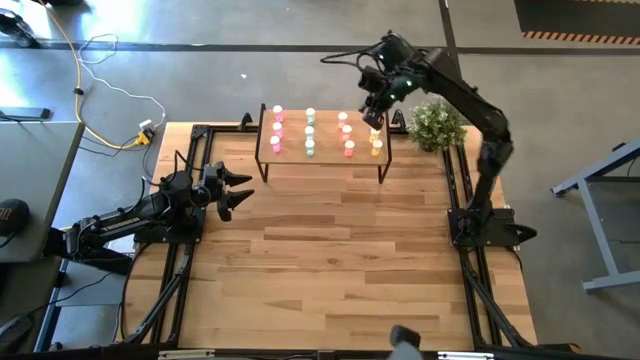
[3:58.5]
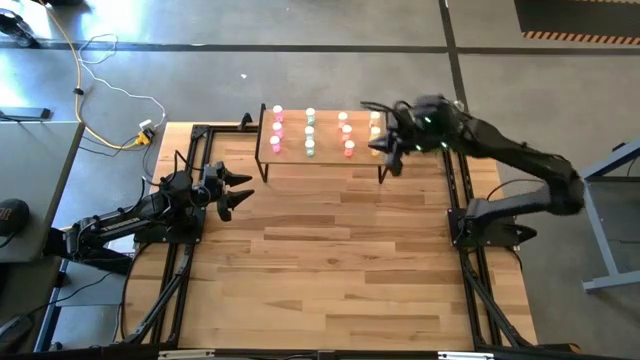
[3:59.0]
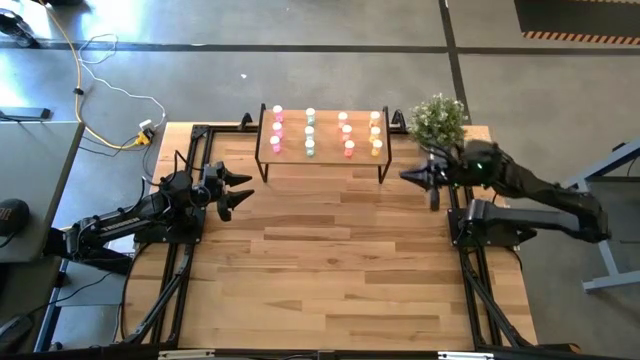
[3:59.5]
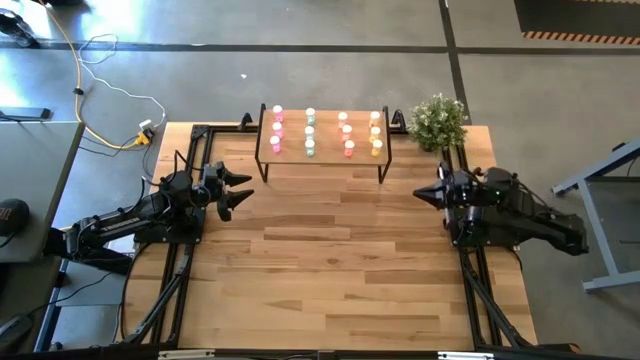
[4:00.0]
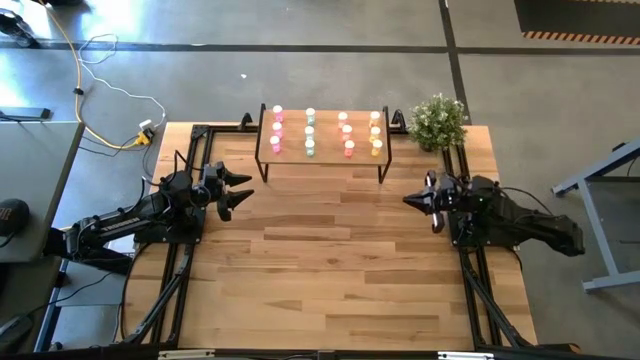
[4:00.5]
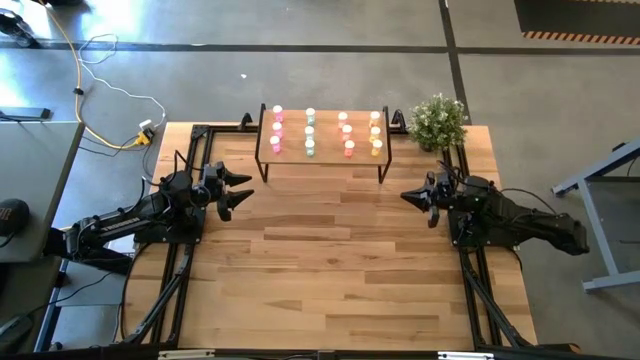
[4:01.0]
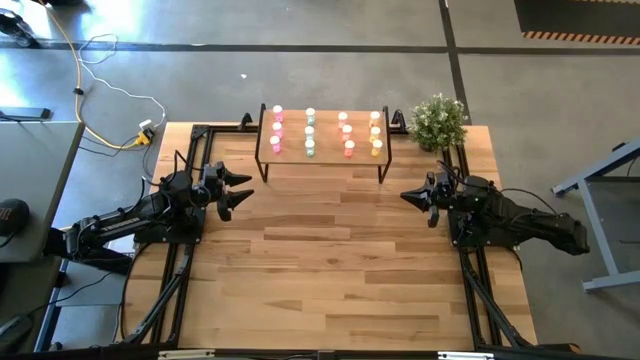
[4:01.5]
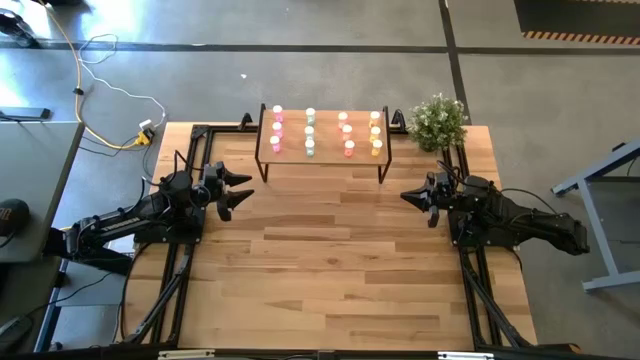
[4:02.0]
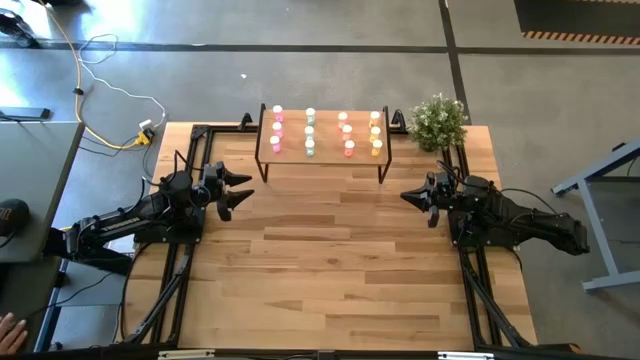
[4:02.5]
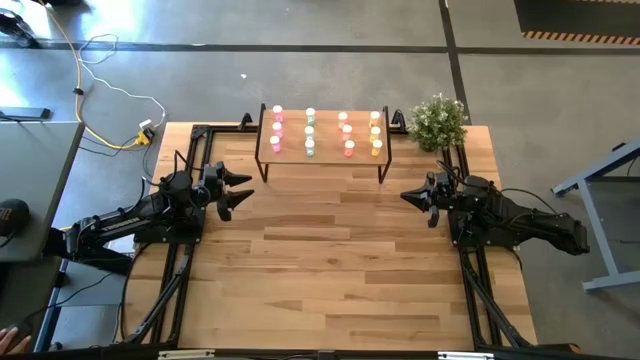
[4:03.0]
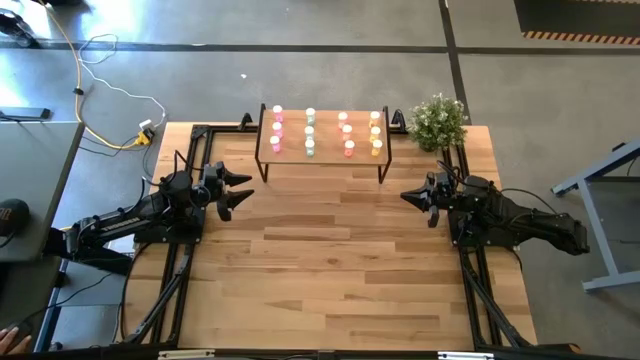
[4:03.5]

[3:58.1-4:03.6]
Task: Pick and place medicine bottles onto shelf by color
Return to Home Position

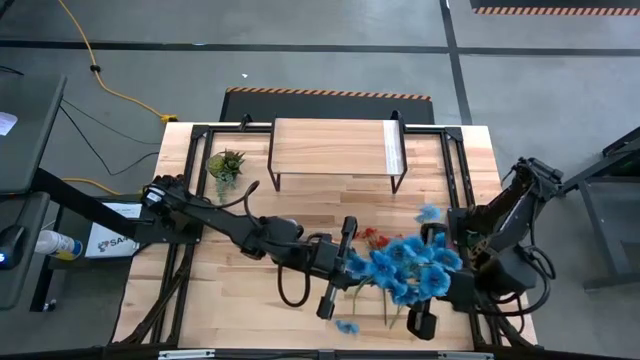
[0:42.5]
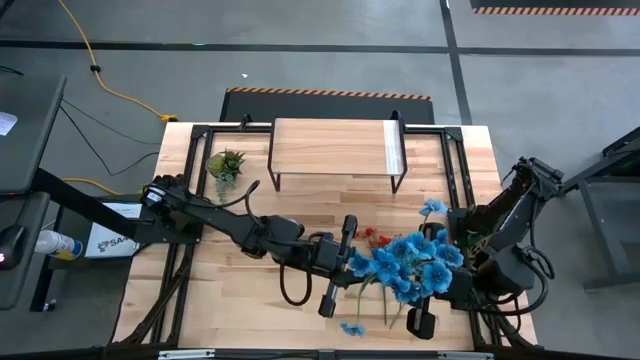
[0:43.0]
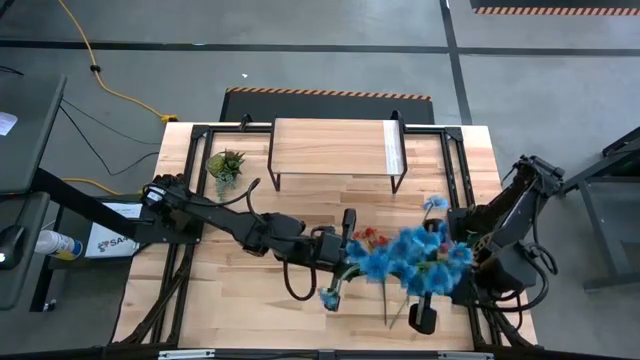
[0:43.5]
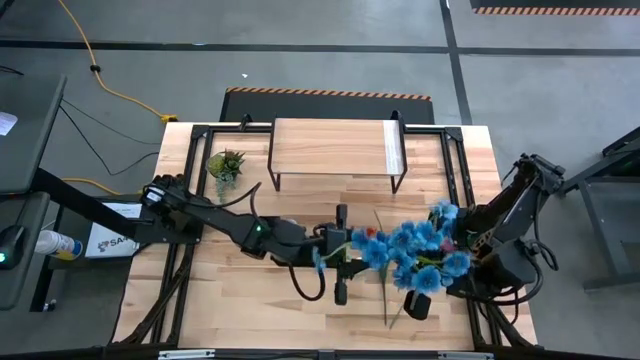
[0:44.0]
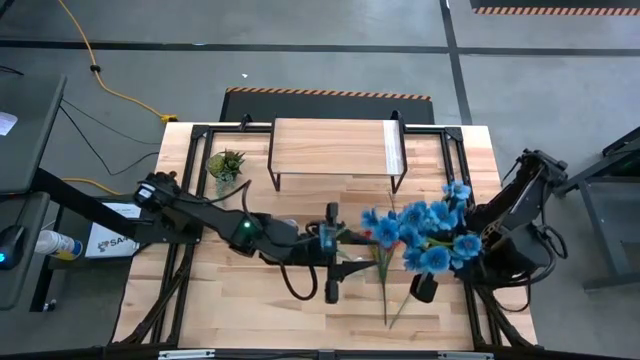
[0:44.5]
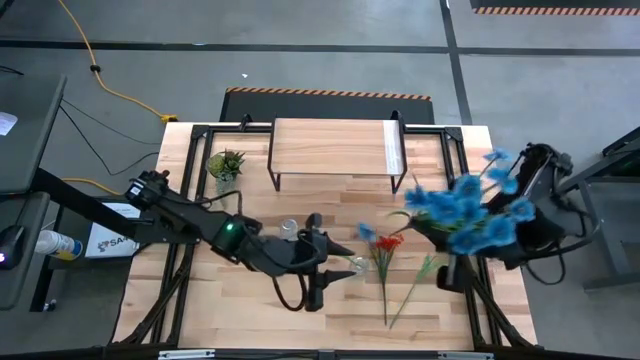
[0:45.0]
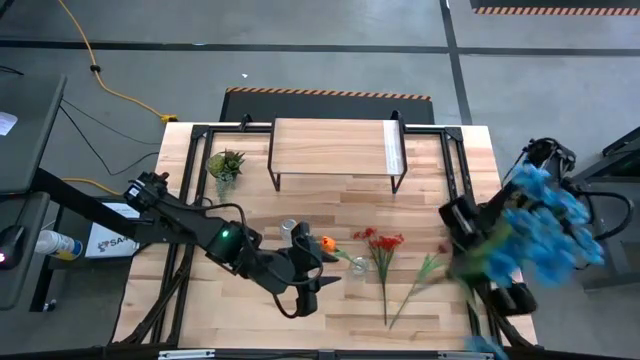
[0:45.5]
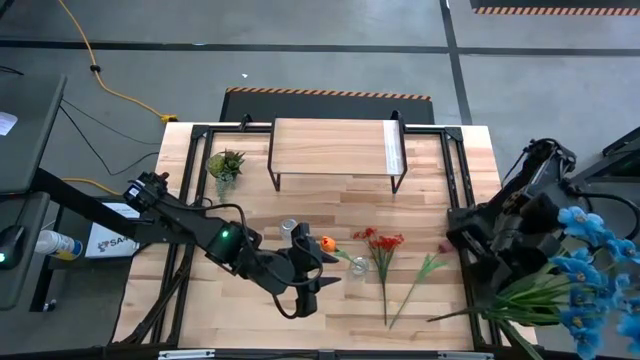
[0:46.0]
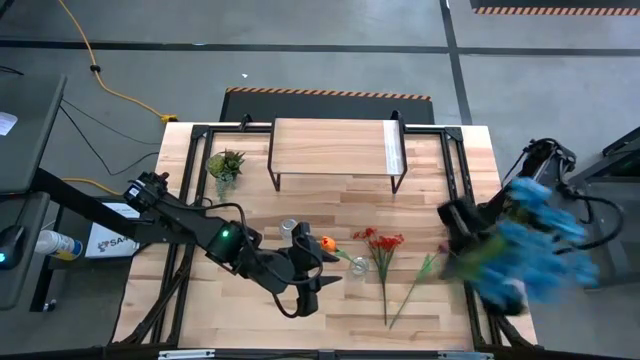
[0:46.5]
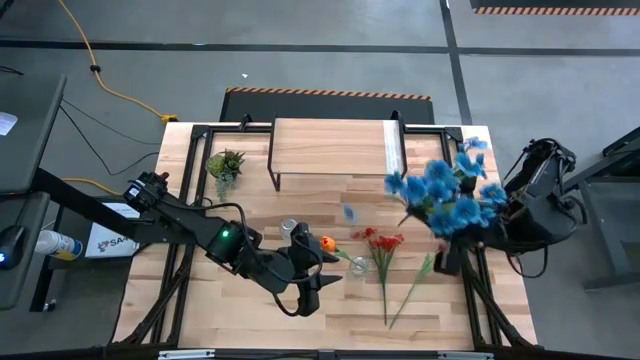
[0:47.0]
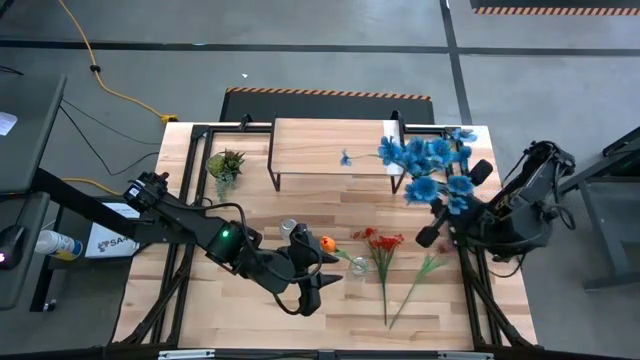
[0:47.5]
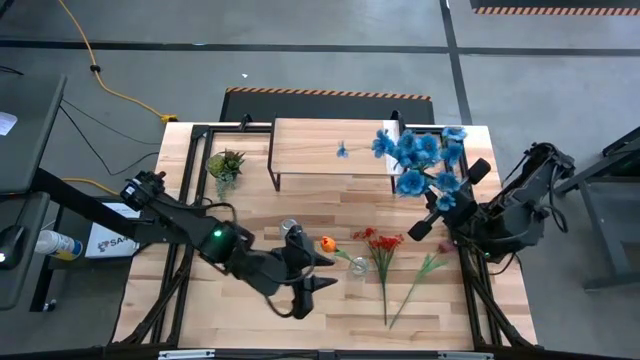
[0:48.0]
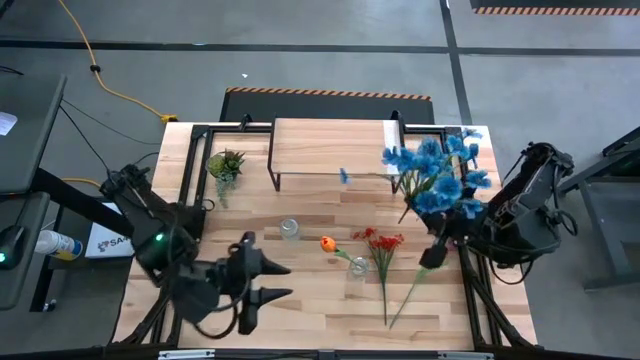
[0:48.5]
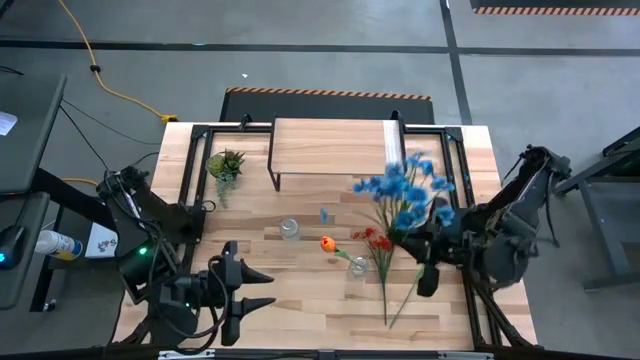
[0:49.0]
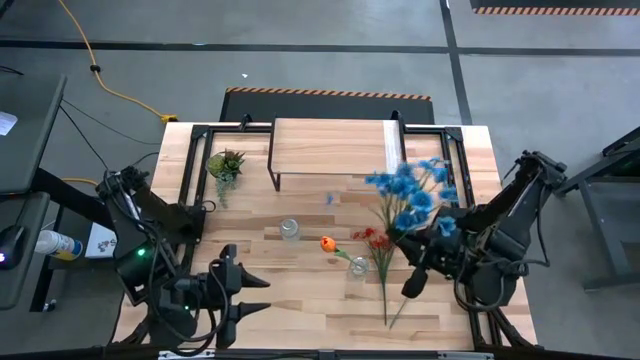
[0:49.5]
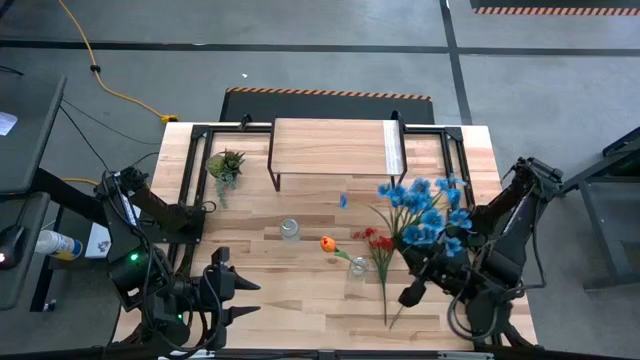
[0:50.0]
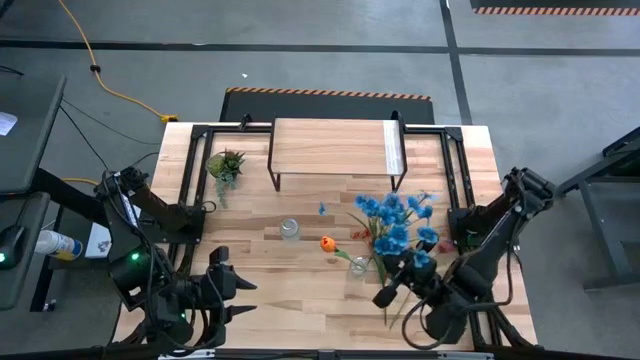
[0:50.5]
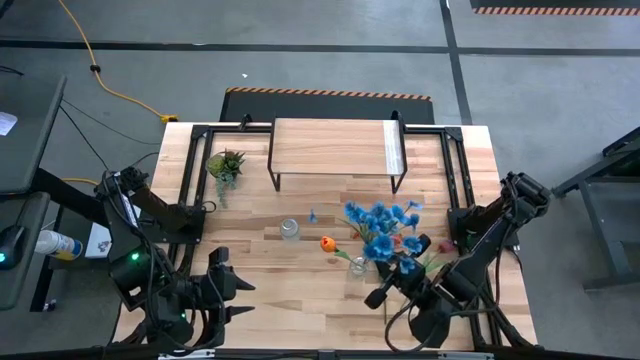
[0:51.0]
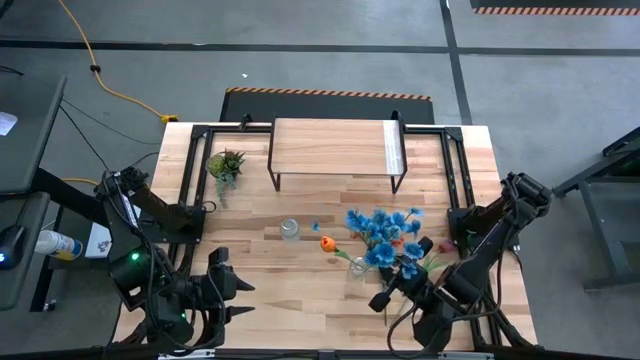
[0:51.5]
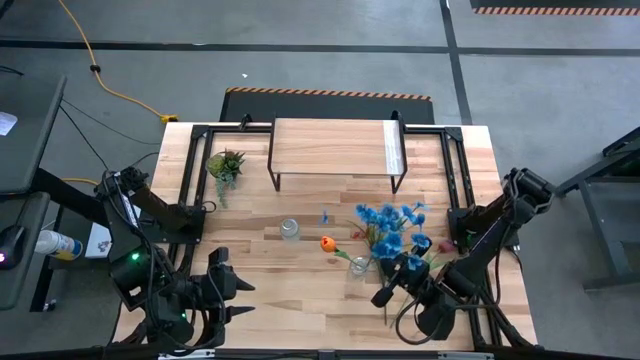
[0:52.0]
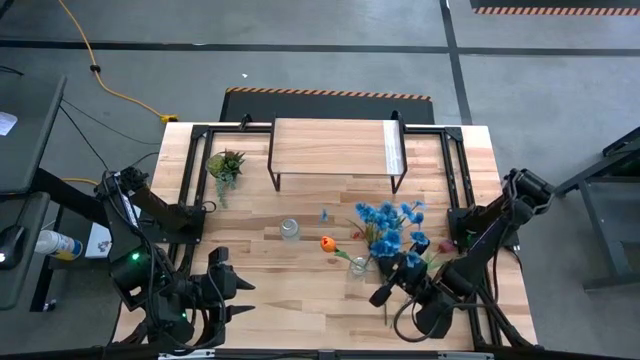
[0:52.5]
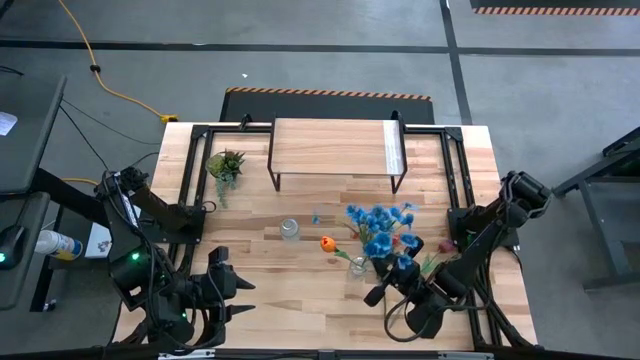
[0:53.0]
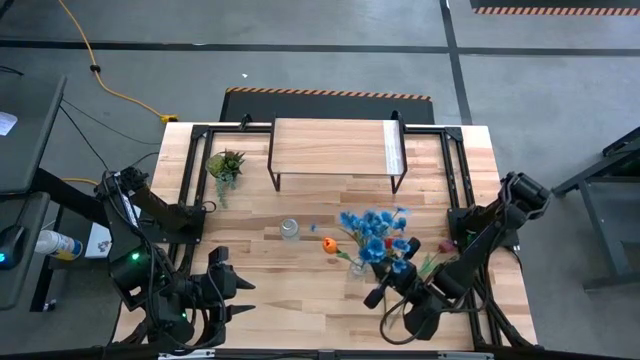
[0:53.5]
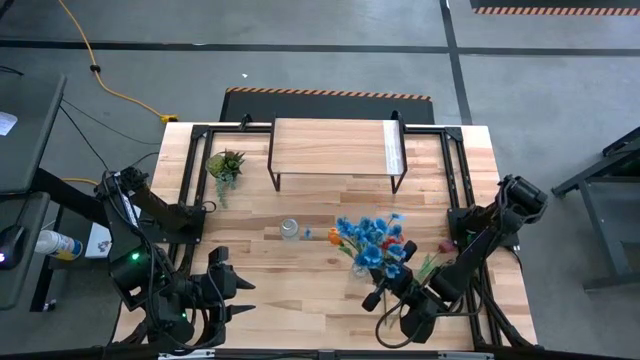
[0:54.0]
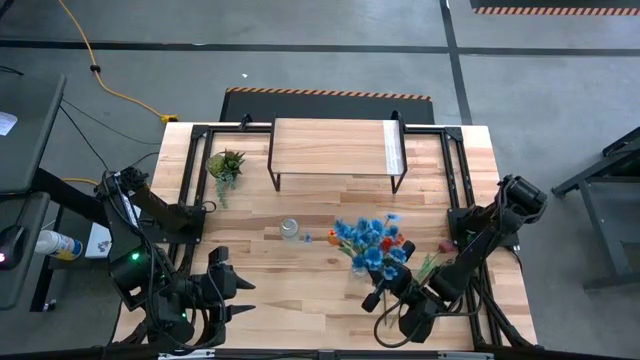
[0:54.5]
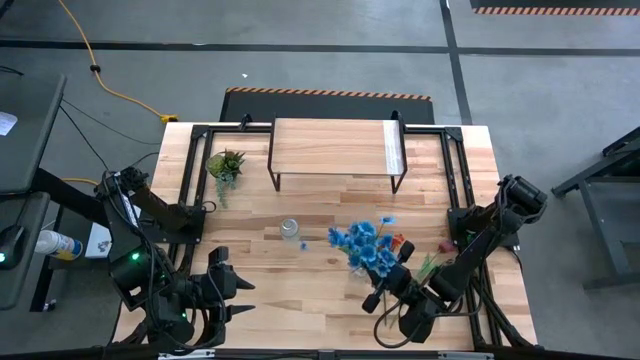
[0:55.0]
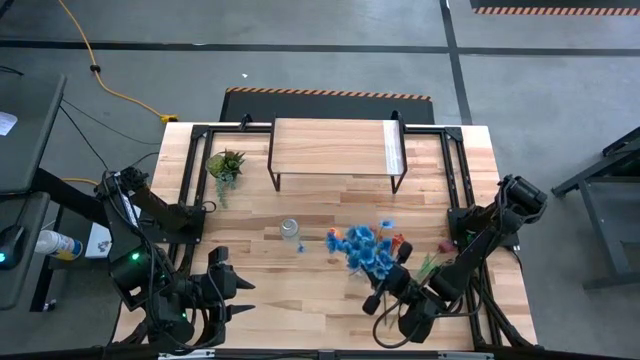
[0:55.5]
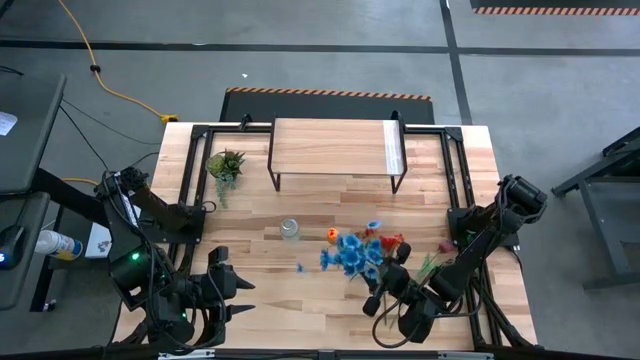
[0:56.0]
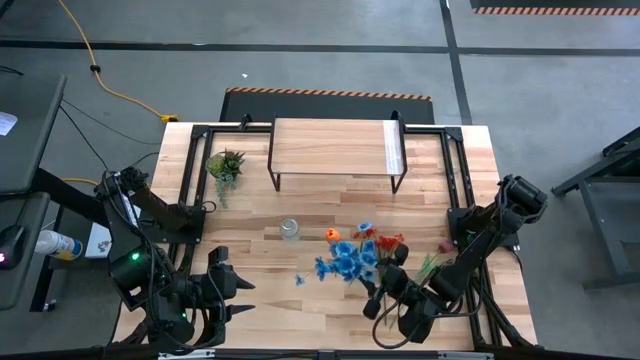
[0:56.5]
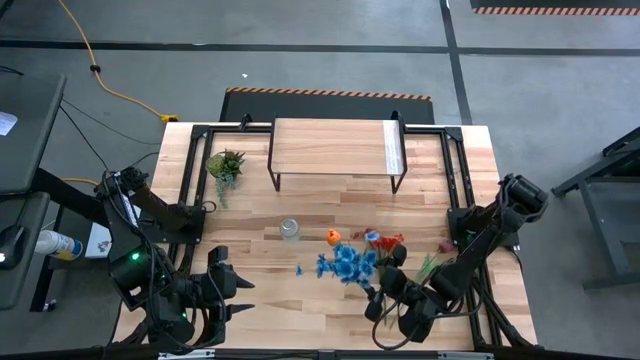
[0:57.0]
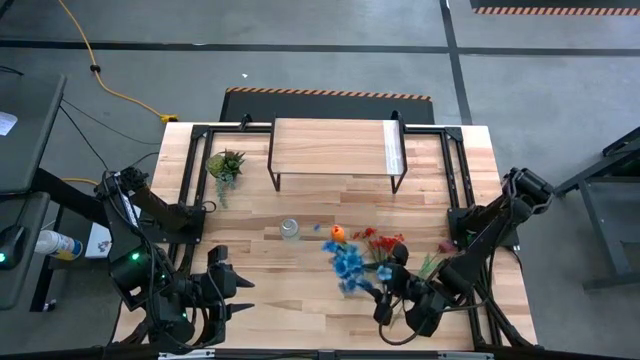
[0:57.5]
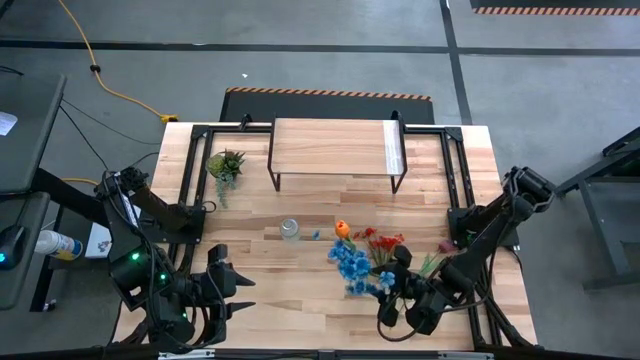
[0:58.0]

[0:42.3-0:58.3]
Task: Pick and place flowers into a vace then onto a shelf
Put the blue flowers into the right transparent vase
